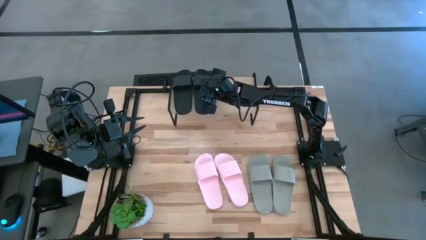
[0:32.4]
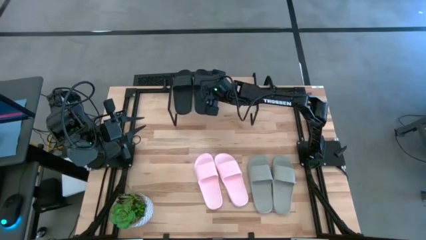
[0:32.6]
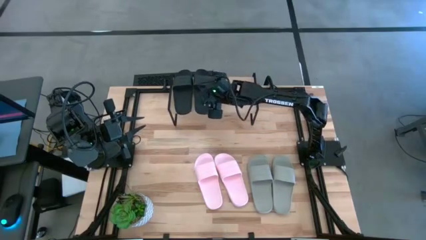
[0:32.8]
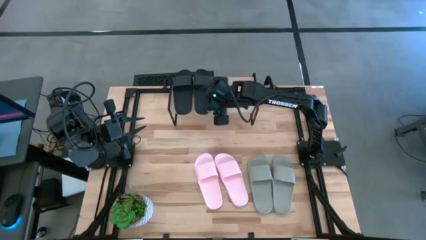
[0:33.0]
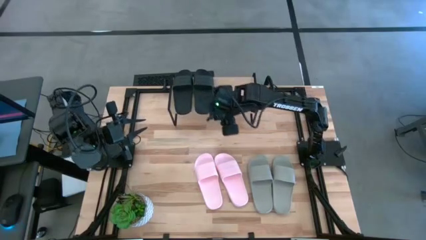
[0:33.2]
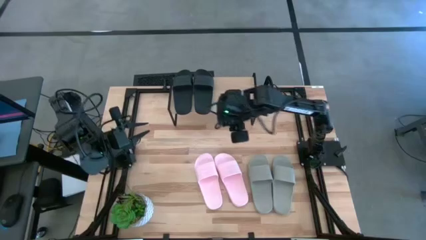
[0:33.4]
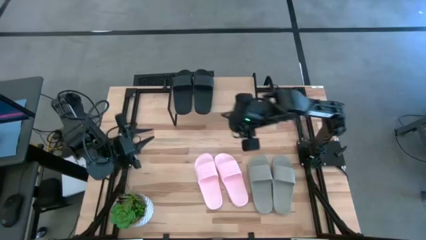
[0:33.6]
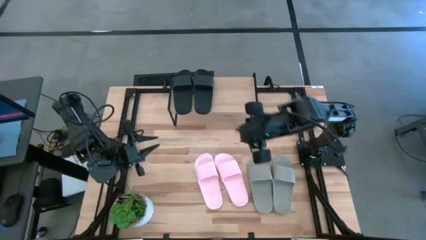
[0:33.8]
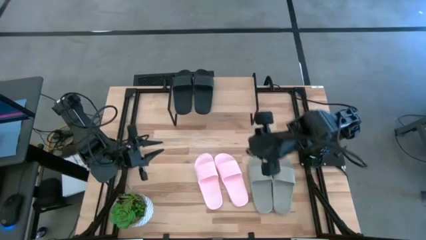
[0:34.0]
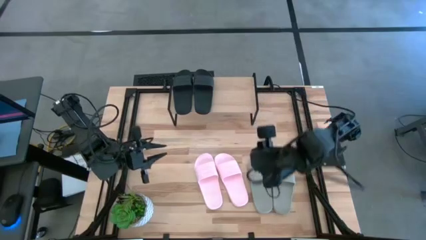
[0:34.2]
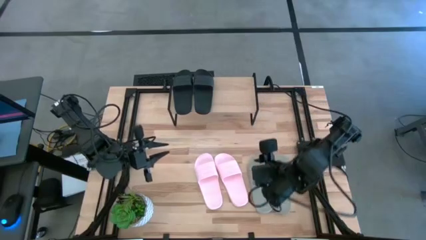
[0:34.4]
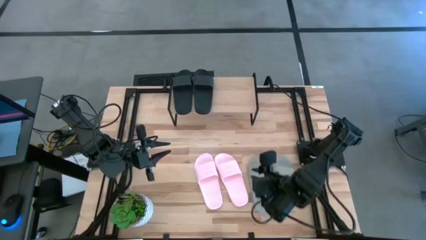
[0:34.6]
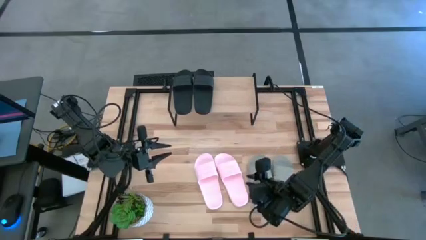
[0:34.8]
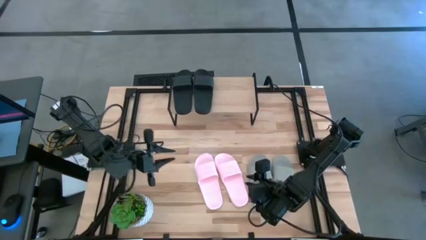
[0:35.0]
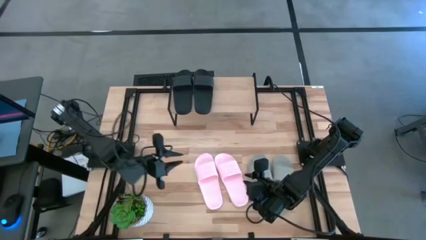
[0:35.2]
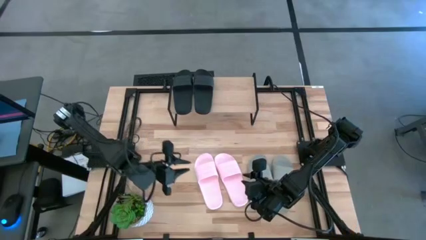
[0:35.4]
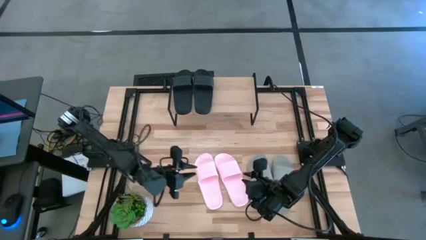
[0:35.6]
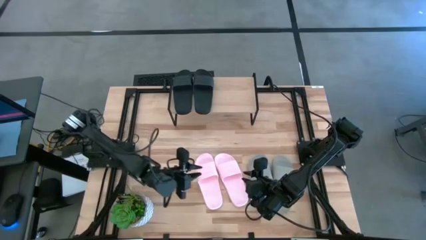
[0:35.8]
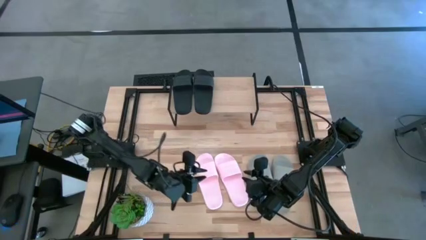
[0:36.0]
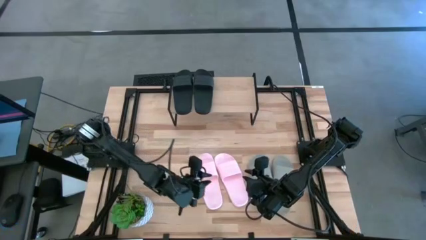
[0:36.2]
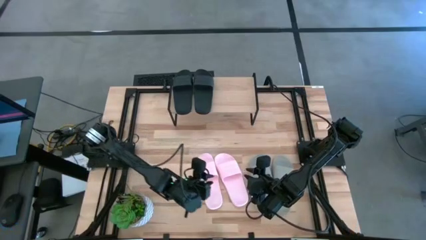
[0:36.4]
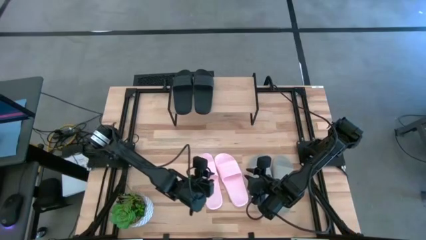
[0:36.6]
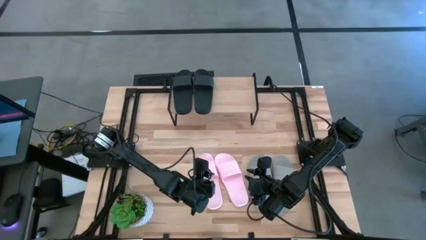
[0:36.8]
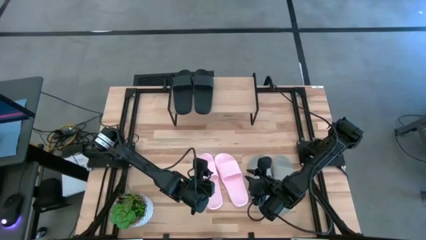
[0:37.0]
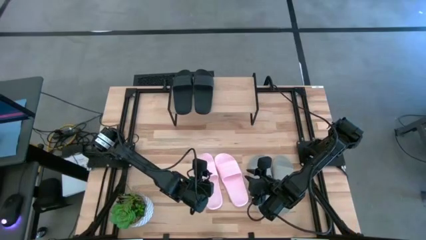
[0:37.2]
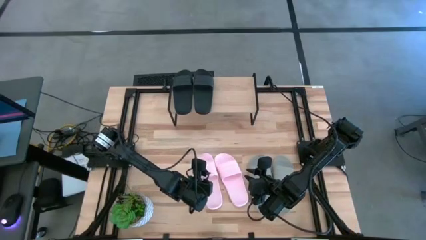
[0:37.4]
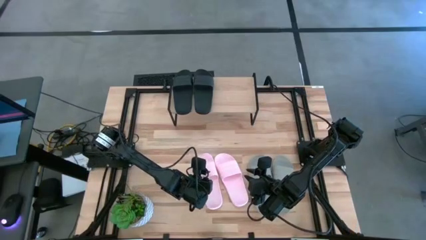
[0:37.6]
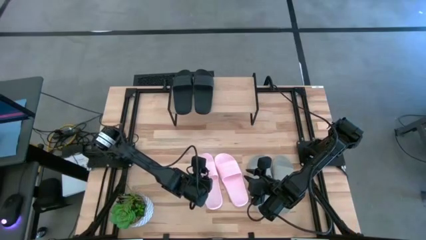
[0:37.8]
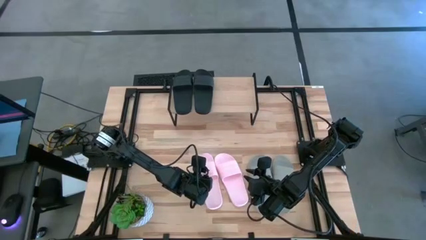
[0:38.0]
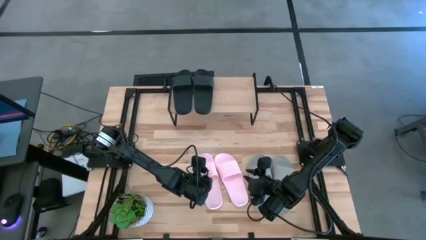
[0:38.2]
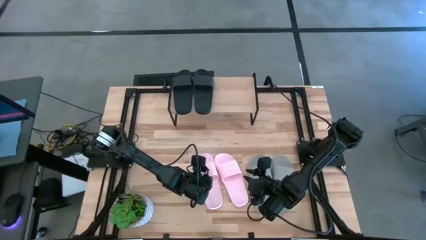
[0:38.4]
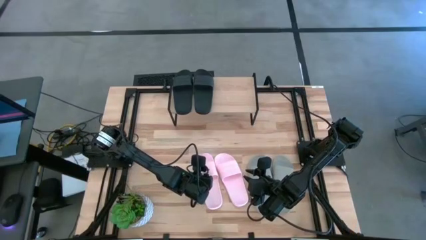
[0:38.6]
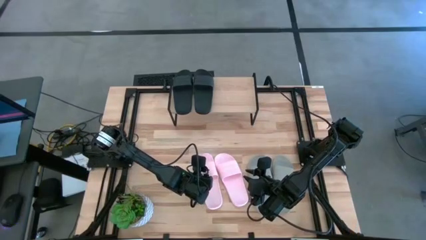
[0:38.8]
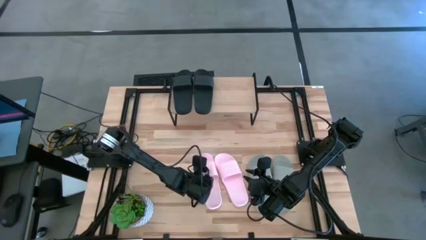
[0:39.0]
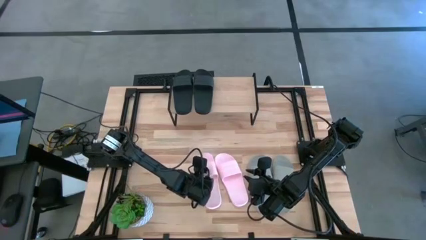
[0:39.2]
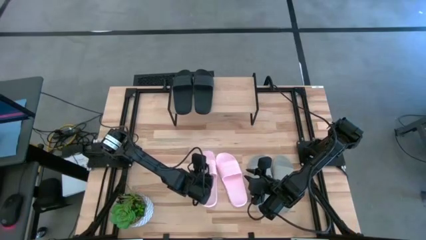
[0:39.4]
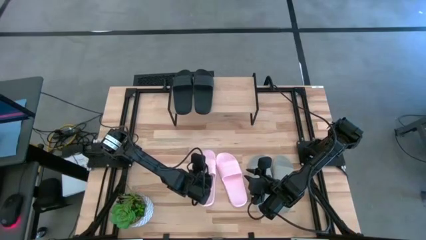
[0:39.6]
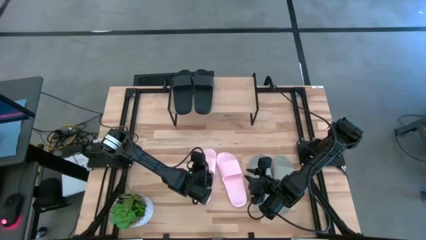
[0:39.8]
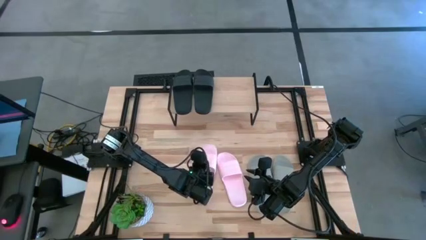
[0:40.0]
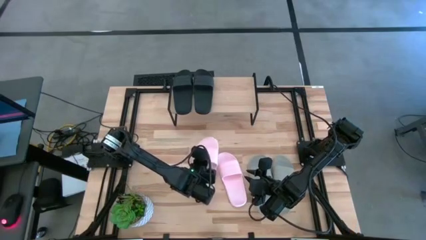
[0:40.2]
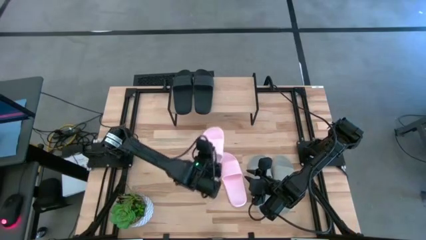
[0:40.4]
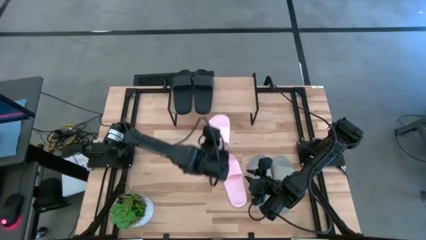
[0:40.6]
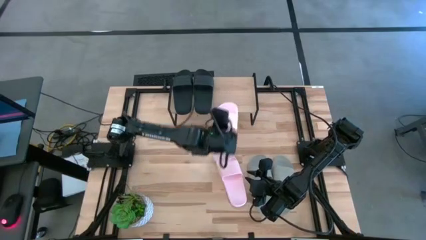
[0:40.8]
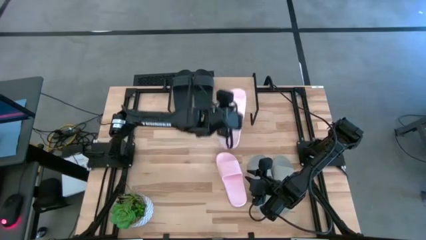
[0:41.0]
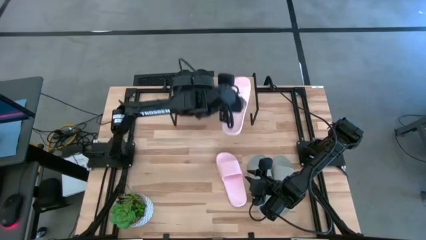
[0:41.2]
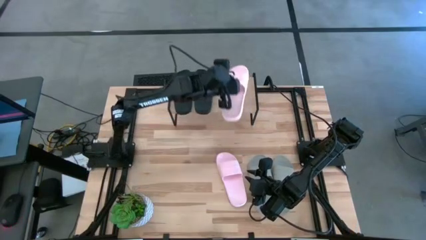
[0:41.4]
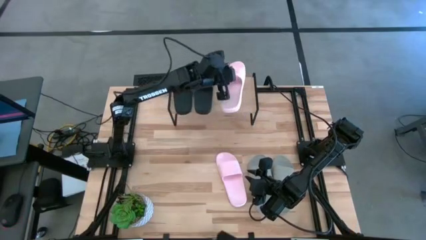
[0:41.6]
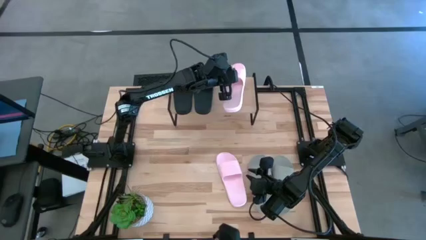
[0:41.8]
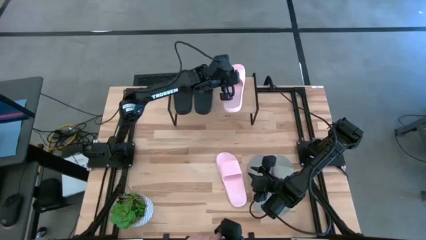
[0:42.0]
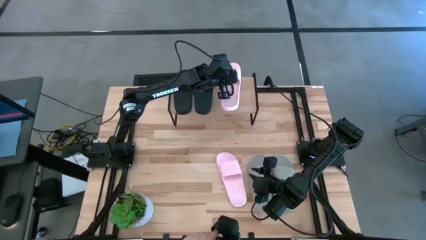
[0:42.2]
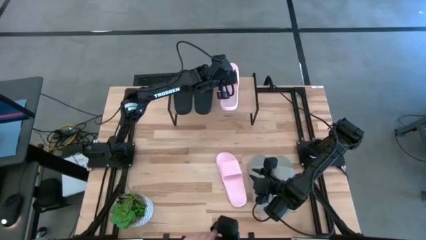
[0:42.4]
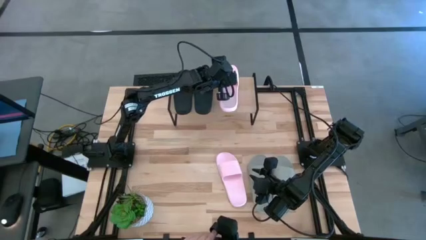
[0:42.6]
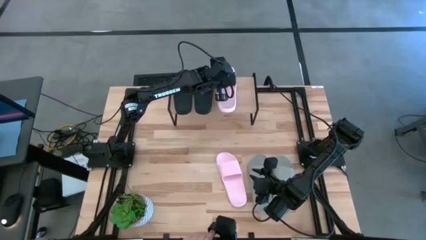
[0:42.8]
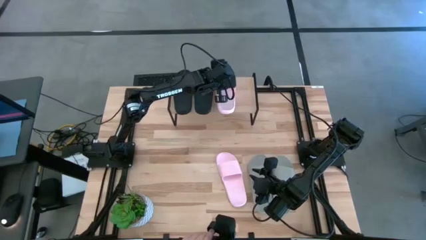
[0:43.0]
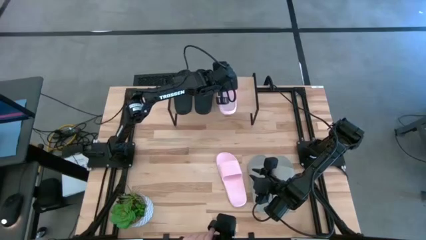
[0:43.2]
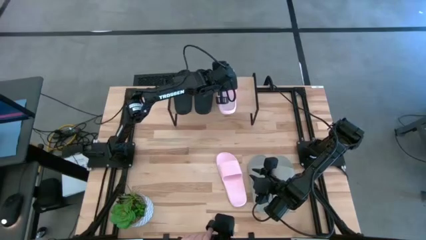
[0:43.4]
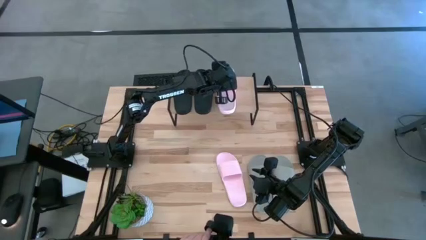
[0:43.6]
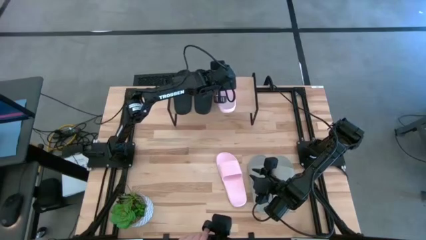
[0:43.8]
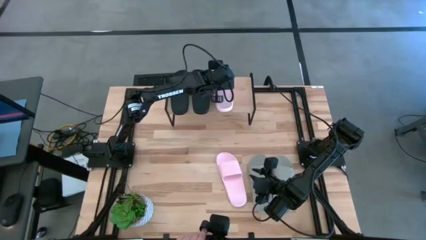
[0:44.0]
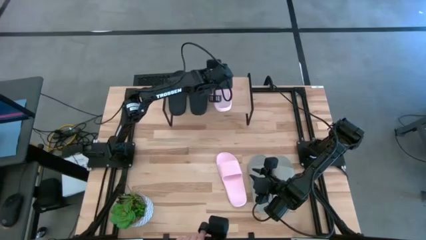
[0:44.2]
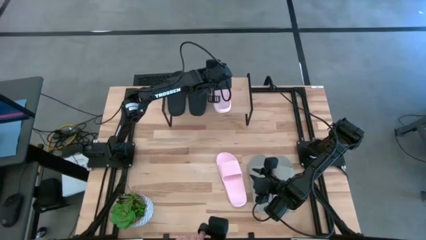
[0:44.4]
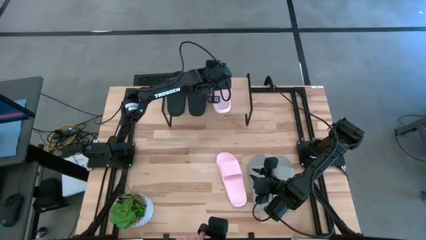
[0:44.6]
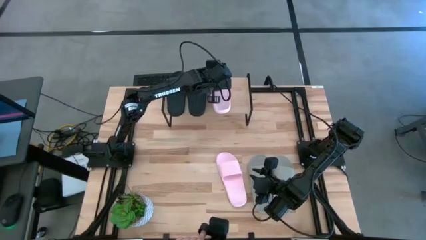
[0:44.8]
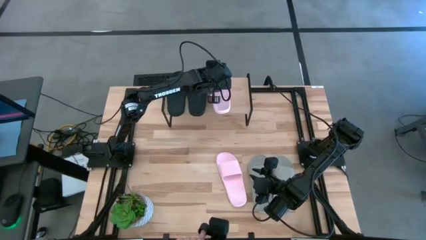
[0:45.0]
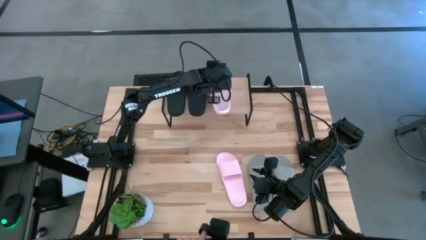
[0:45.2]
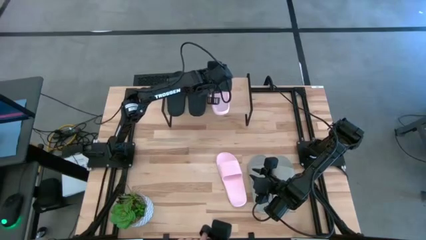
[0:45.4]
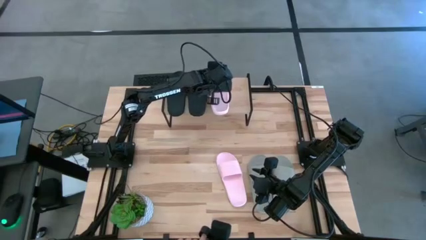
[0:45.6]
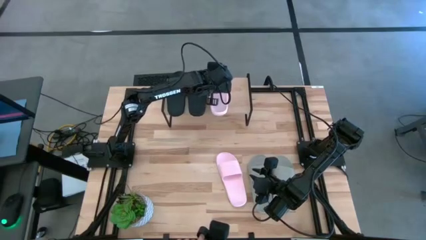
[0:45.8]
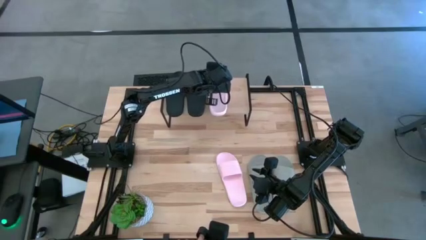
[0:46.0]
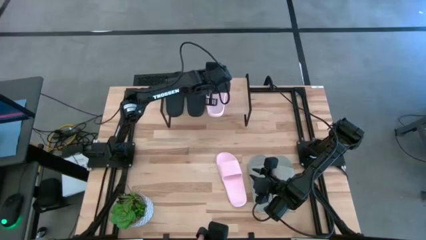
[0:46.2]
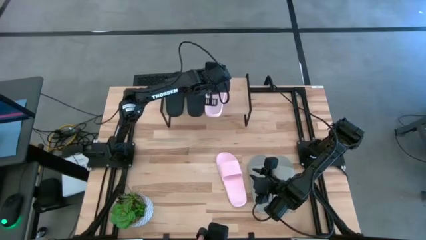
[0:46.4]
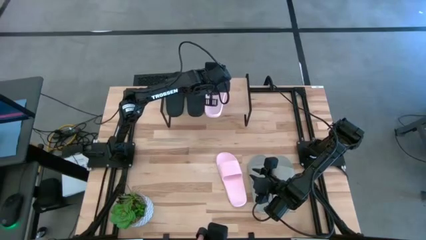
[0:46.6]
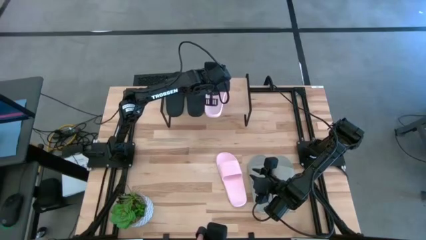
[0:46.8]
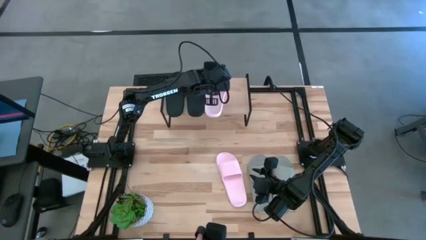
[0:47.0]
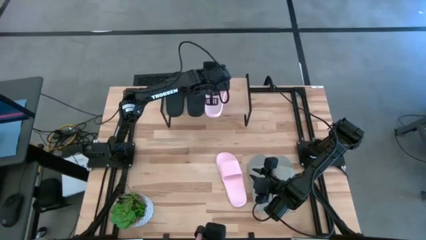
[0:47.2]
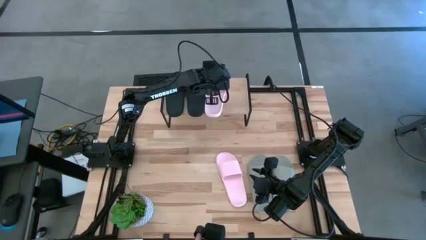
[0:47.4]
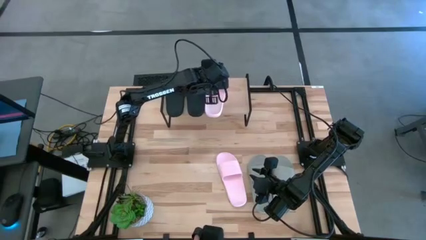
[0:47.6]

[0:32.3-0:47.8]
Task: Pick and place slides into the shelf
Put the left pink slide on the shelf
